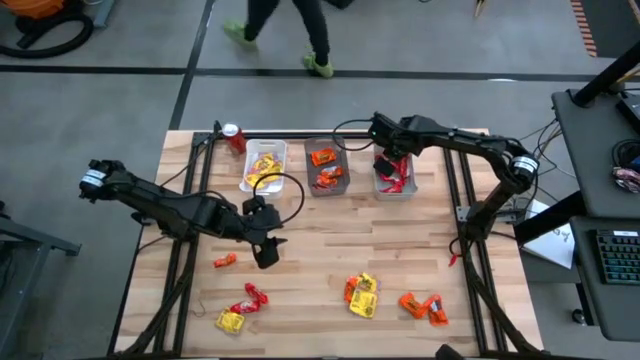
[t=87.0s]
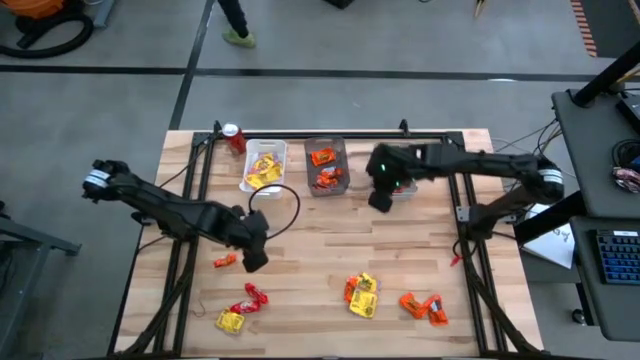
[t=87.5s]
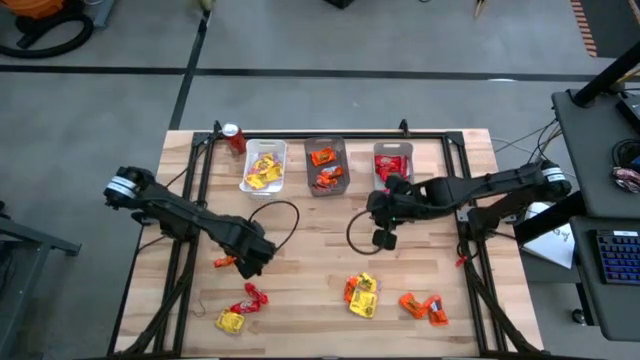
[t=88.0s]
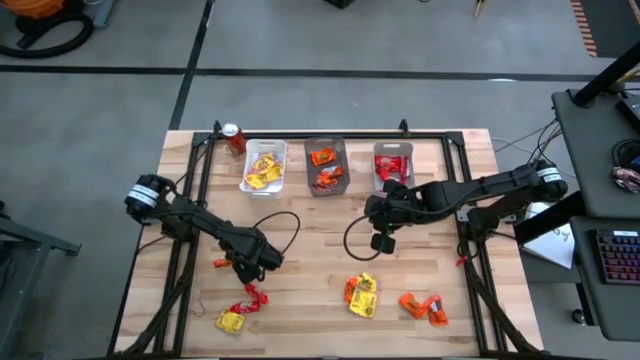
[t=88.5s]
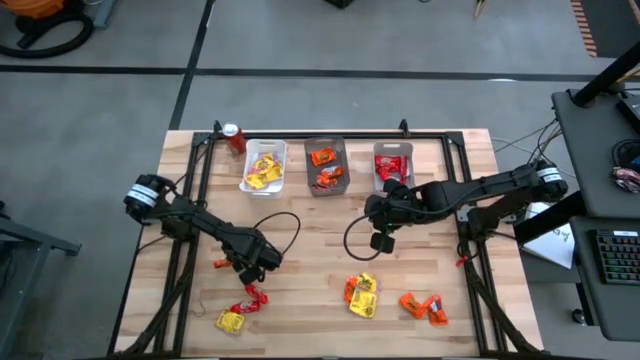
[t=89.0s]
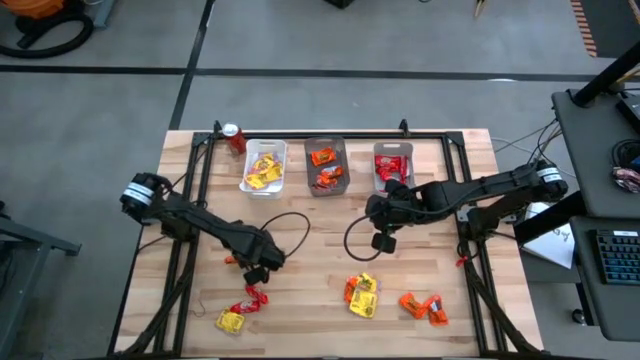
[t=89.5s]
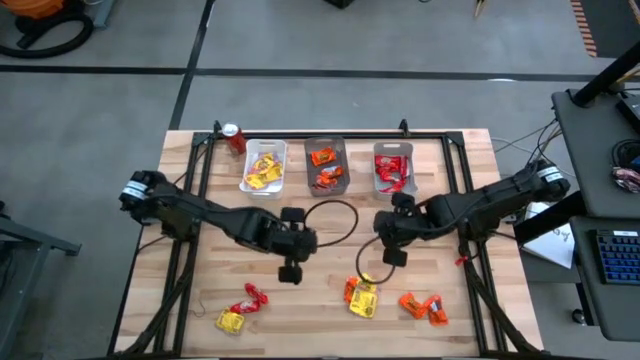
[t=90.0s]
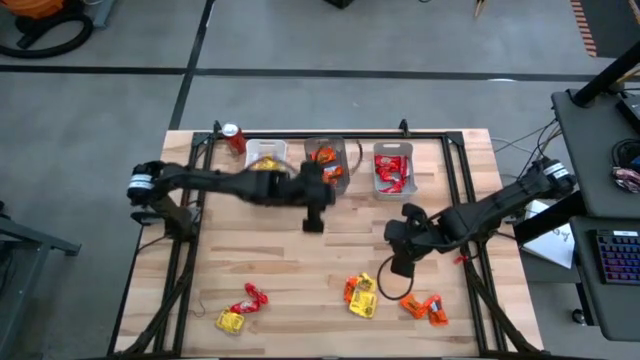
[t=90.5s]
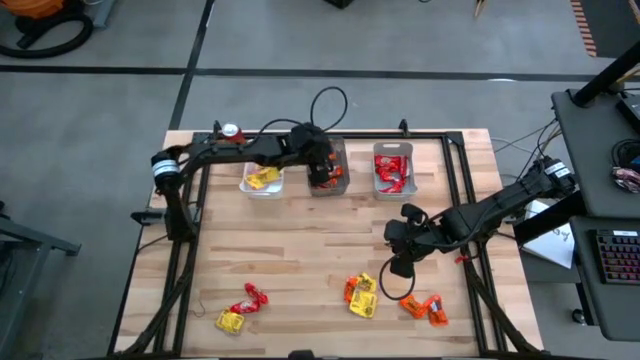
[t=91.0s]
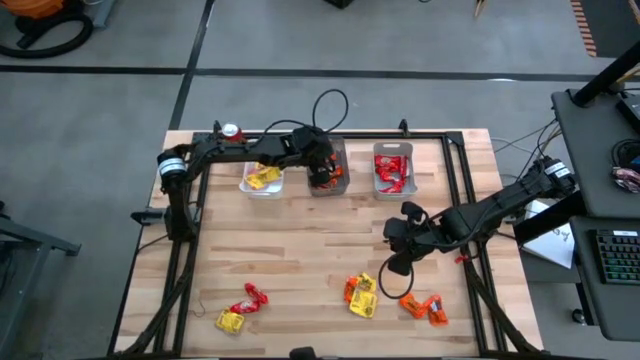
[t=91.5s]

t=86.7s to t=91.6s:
Task: Sort candy
Put the orange chocolate into the black bin

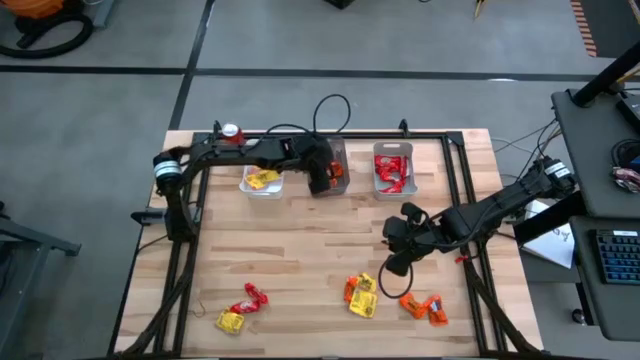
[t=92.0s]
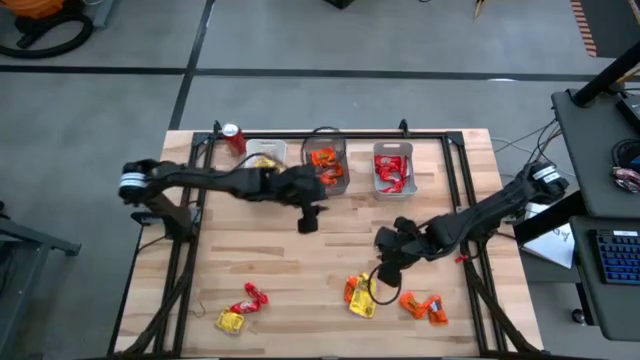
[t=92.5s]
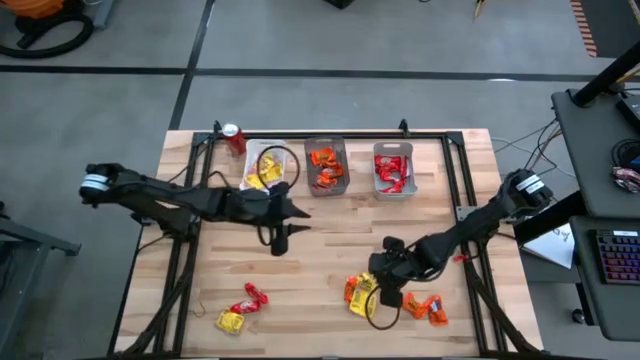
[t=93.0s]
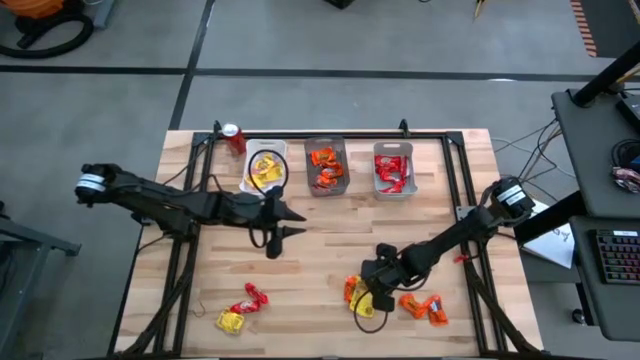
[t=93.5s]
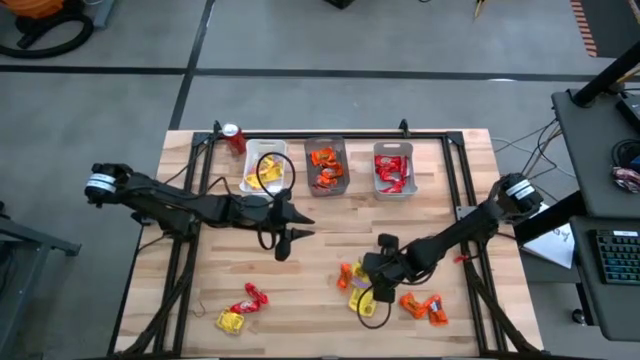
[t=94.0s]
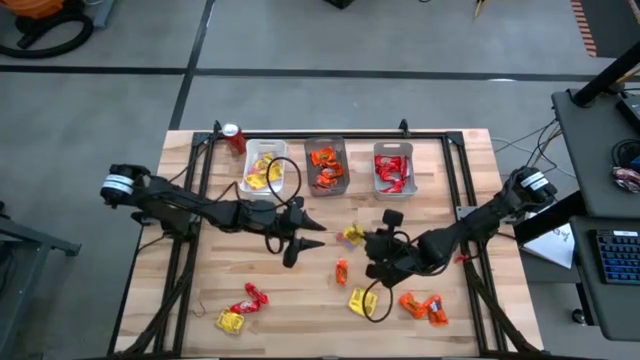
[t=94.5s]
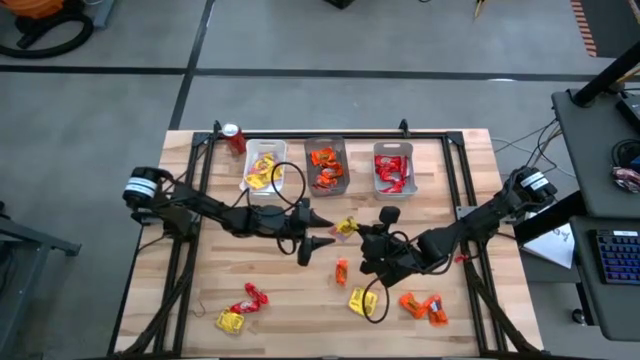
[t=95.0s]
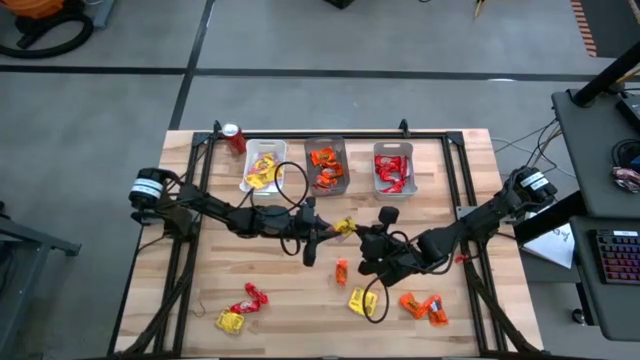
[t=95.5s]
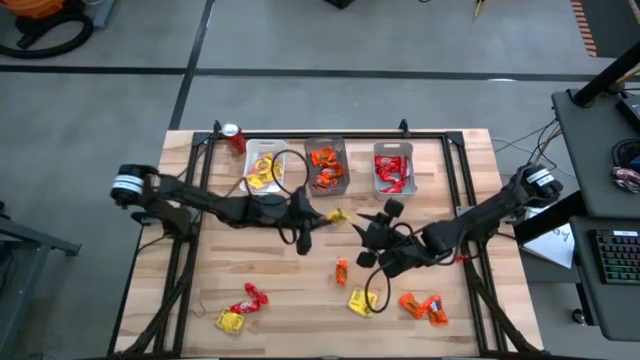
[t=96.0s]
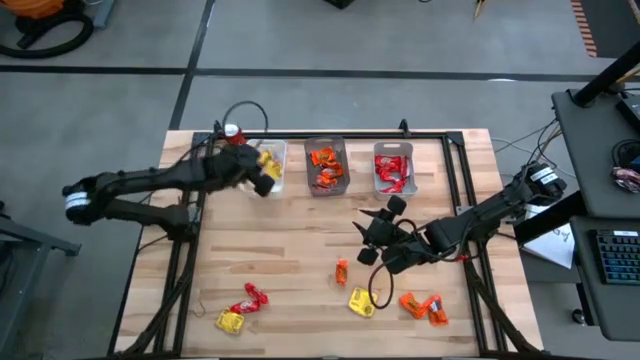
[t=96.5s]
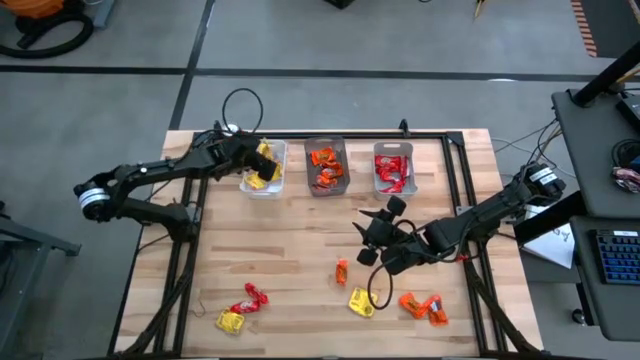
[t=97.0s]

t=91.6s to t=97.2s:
Put the yellow candy into the white bin

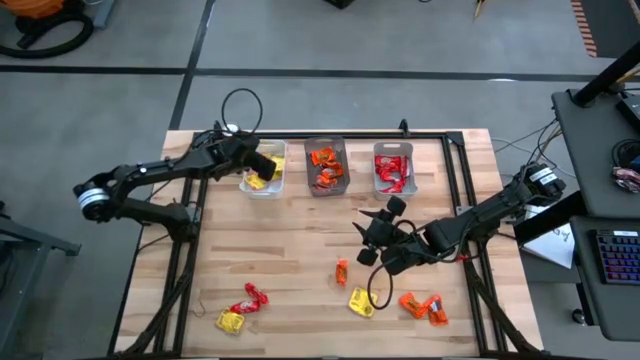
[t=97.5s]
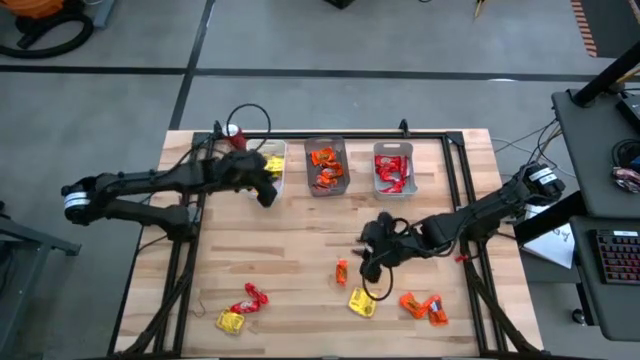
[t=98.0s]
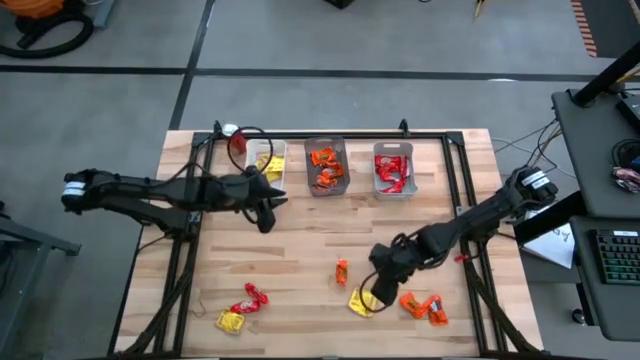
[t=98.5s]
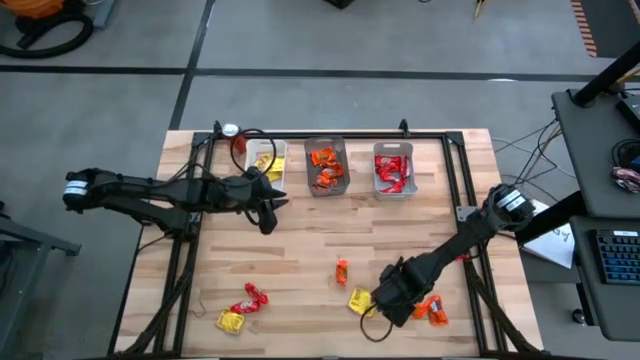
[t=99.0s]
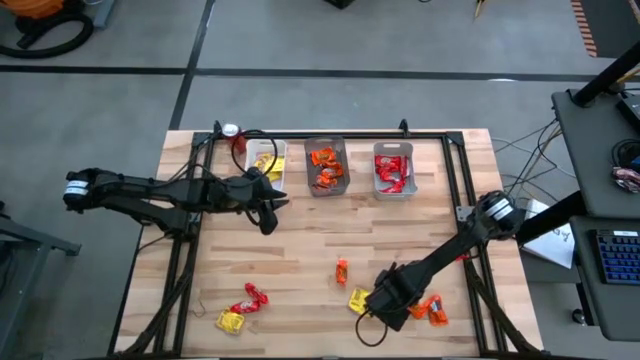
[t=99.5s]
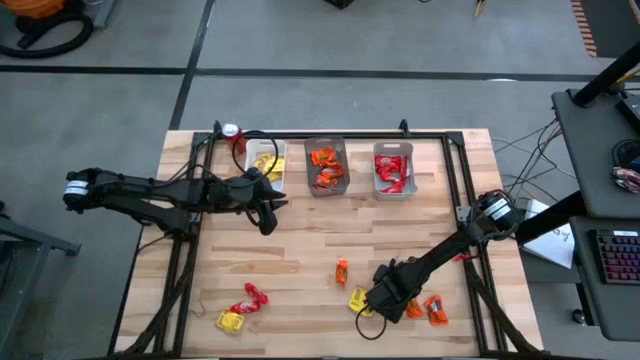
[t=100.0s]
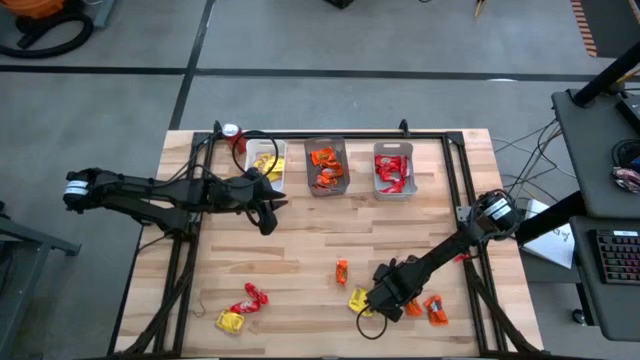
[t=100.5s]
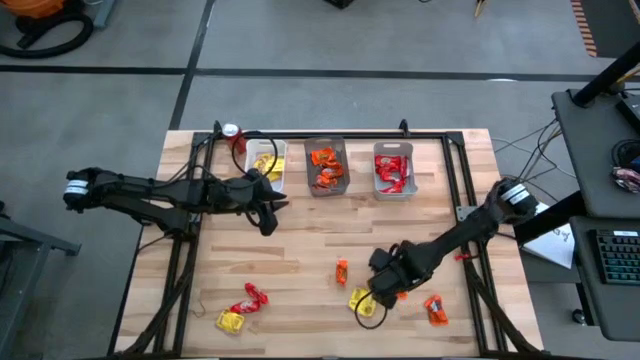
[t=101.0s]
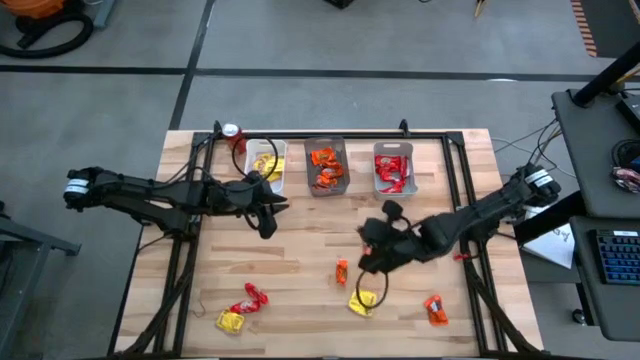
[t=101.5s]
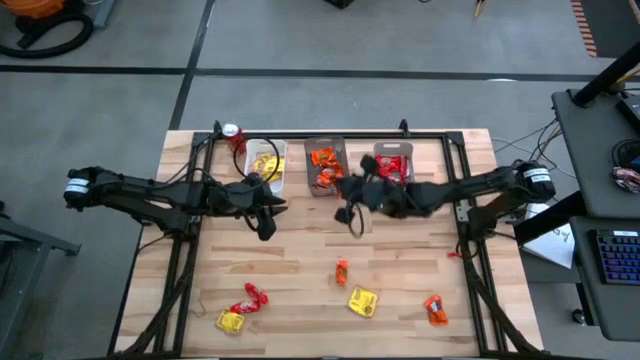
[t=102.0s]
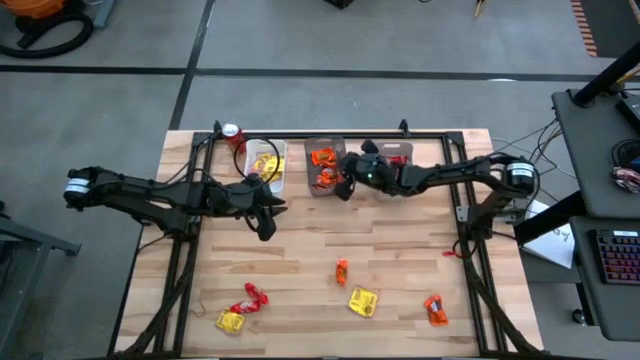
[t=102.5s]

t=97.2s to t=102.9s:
Put the orange chocolate into the black bin

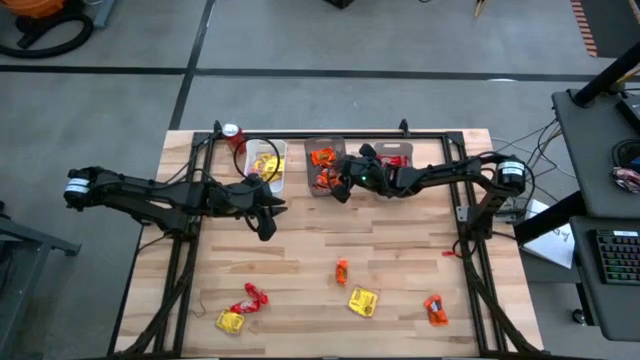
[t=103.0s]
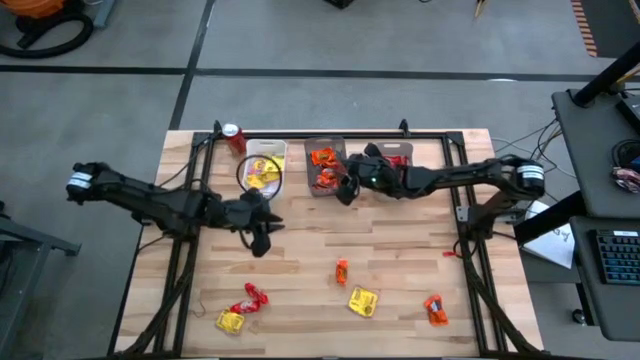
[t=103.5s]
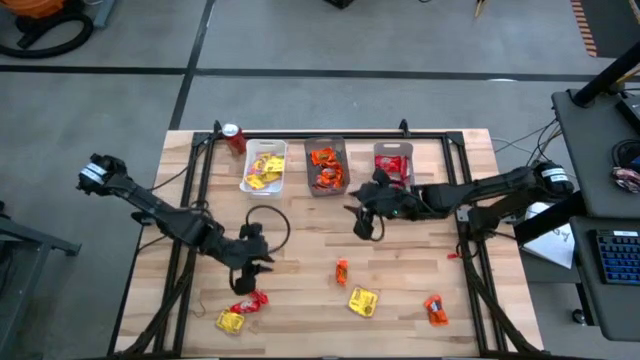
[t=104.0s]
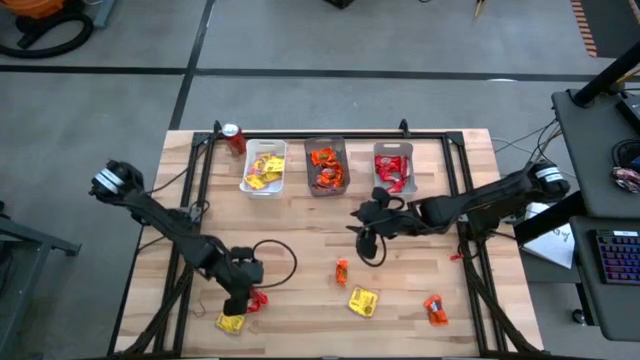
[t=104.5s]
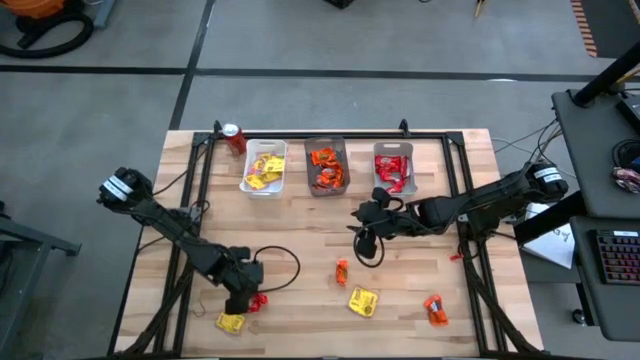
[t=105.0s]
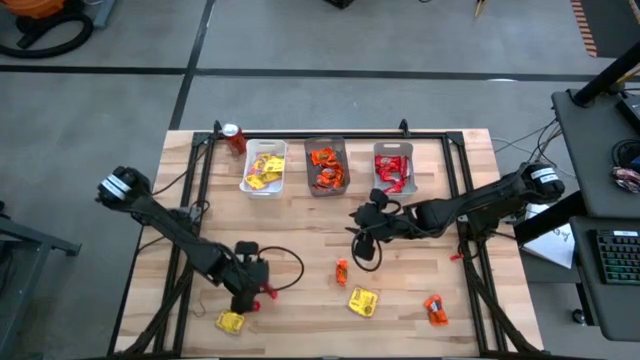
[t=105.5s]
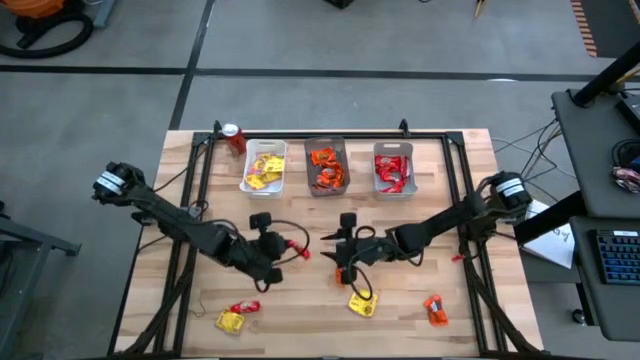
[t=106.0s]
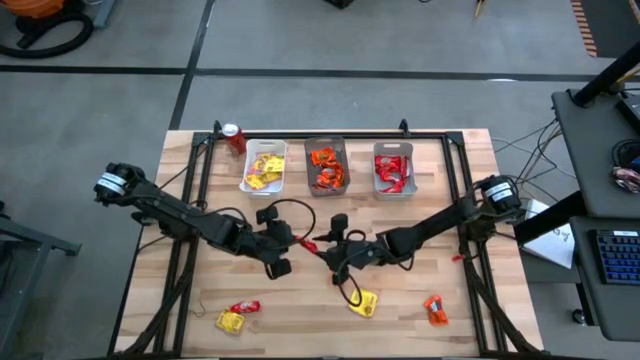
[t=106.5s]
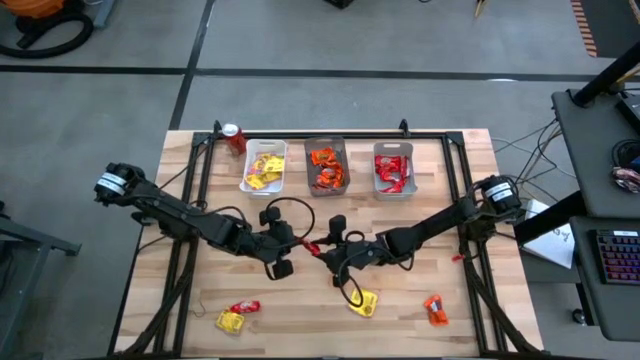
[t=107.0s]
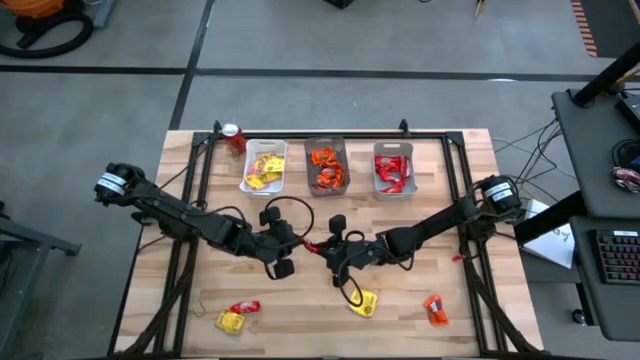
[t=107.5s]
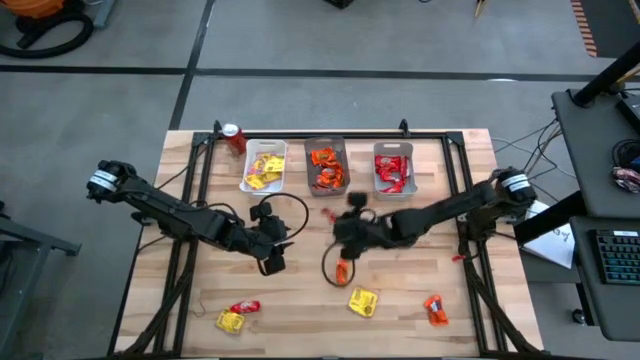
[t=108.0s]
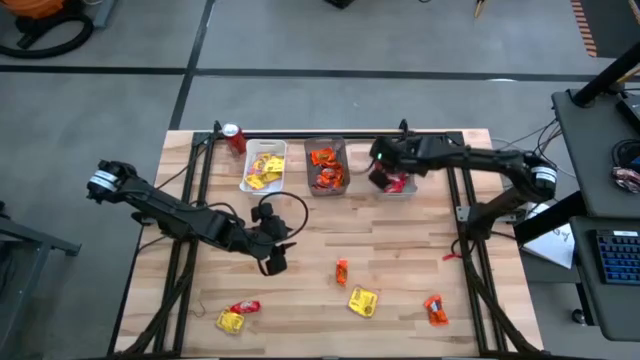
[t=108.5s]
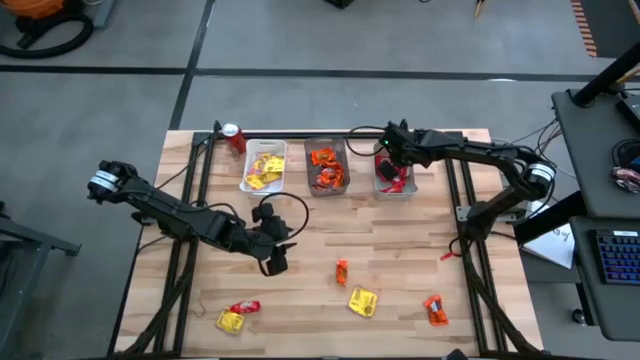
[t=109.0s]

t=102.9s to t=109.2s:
Put the red chocolate into the gray bin
